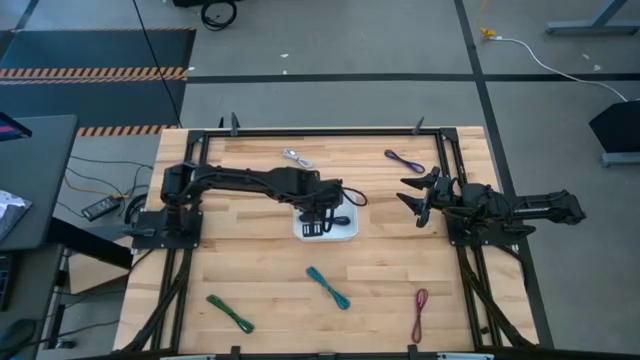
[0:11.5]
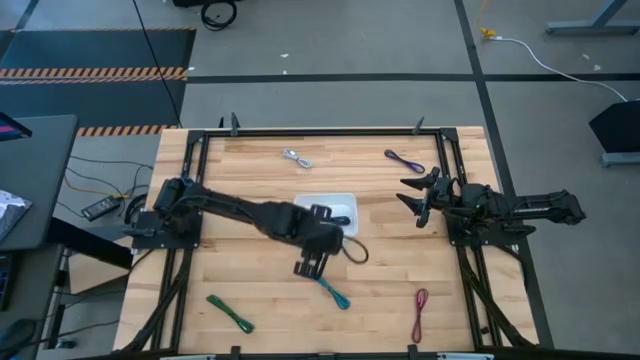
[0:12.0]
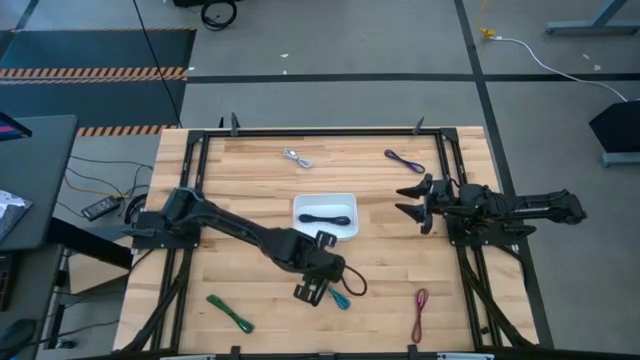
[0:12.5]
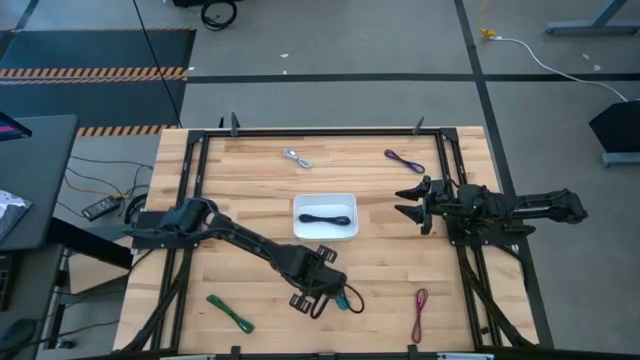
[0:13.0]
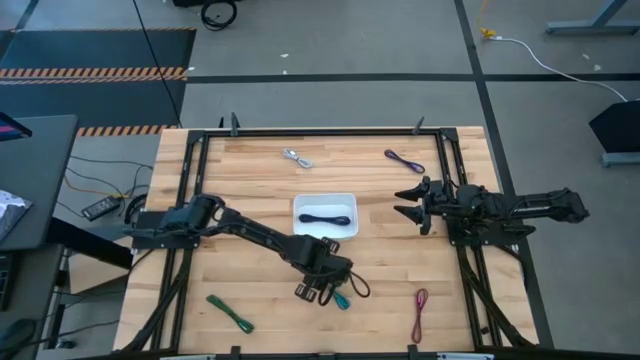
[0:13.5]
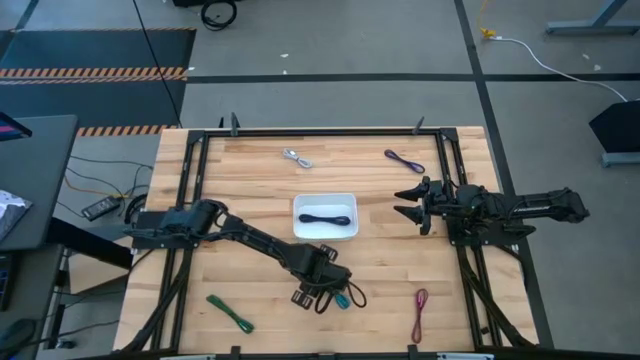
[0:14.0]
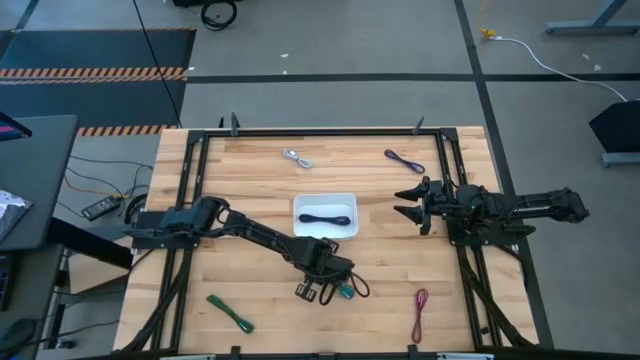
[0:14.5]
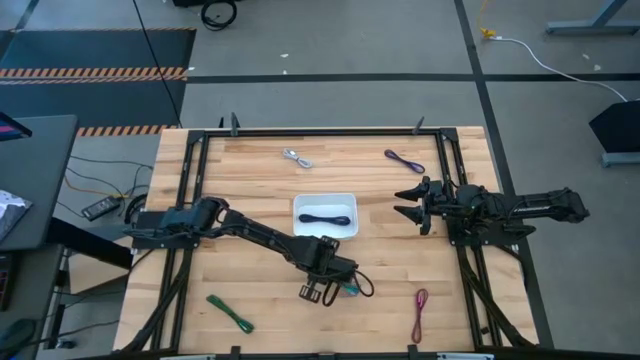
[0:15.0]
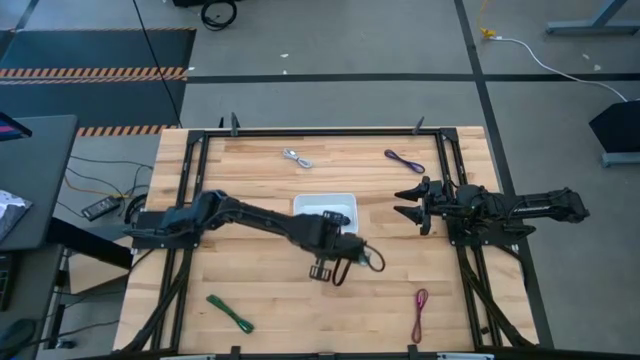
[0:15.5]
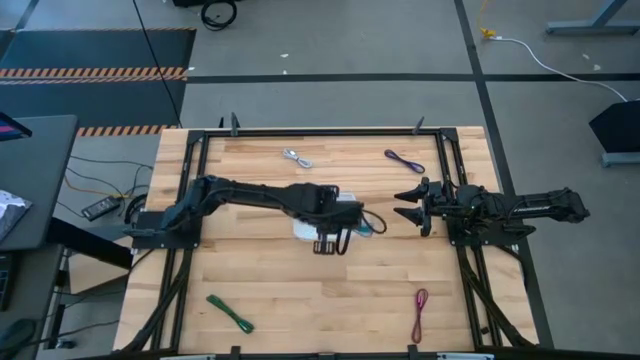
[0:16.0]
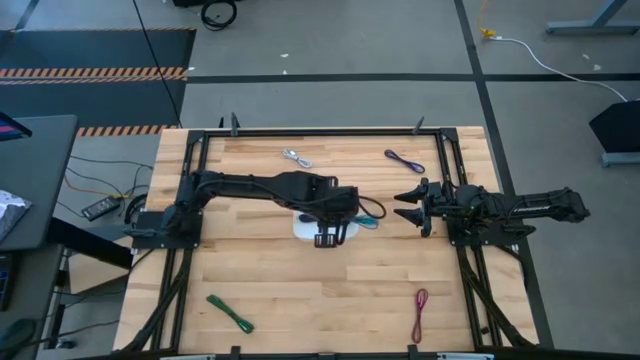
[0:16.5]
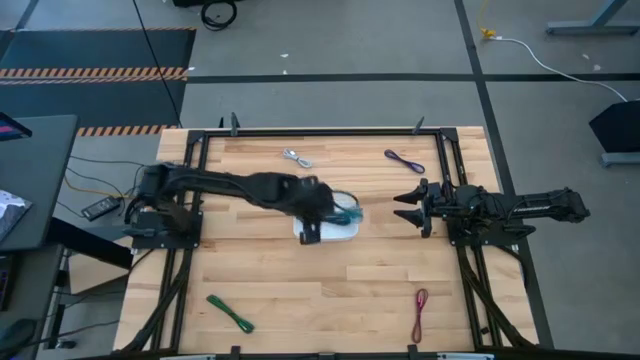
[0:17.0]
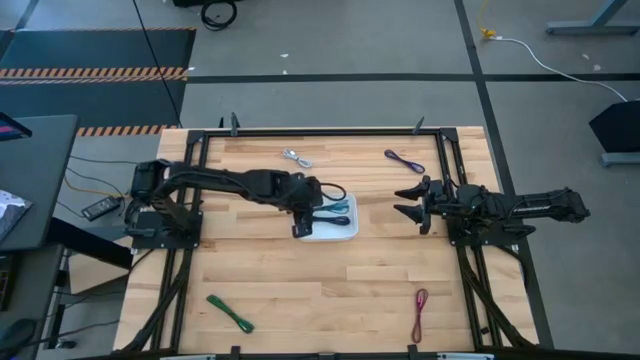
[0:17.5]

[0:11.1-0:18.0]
Task: Pick and place USB-C Cables
Put the light blue charger cable into the white bin

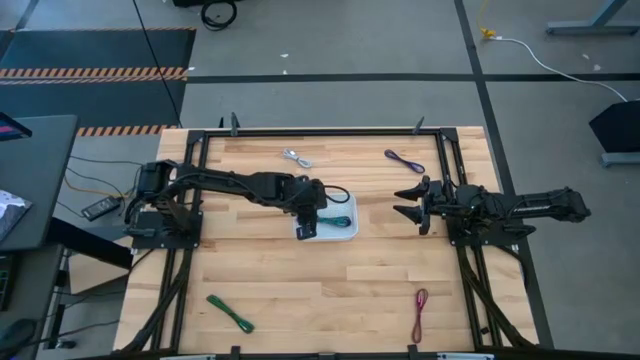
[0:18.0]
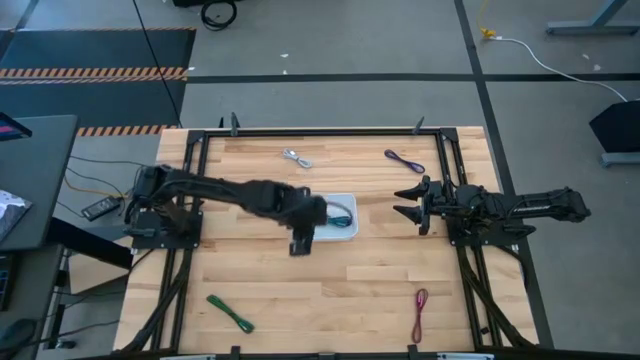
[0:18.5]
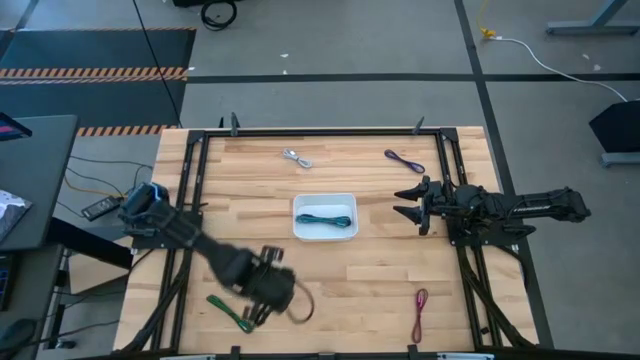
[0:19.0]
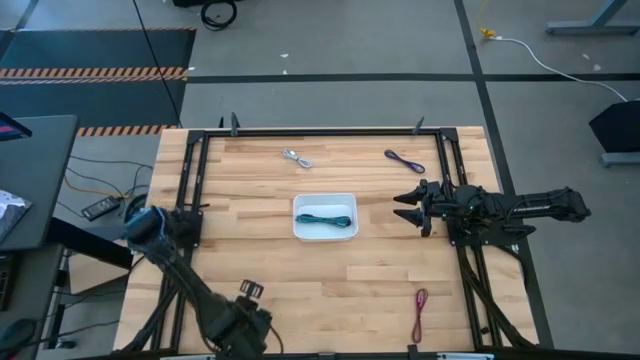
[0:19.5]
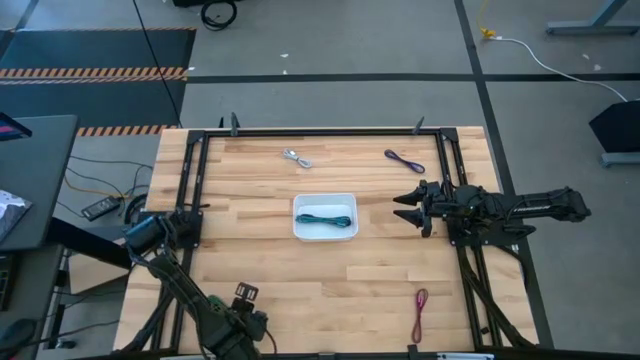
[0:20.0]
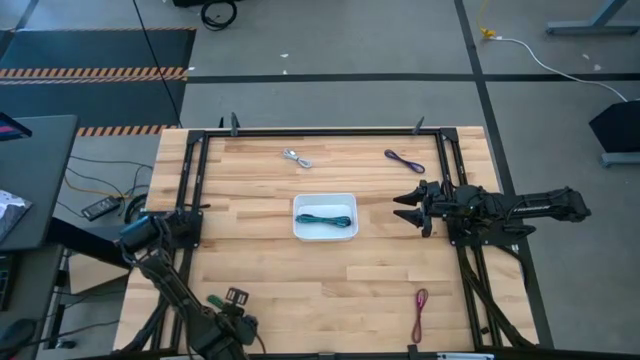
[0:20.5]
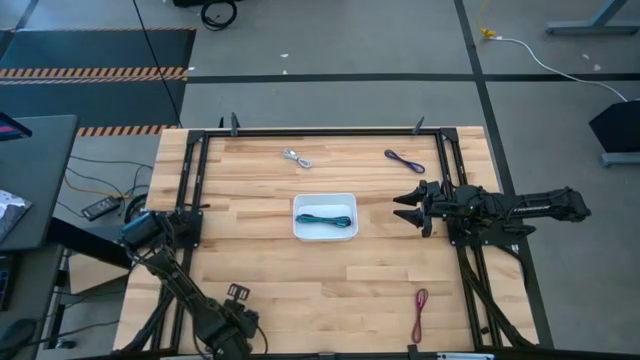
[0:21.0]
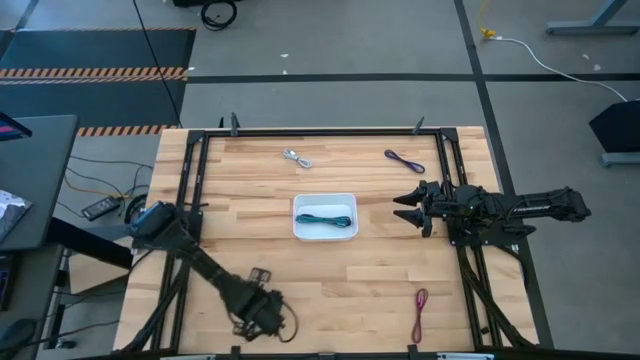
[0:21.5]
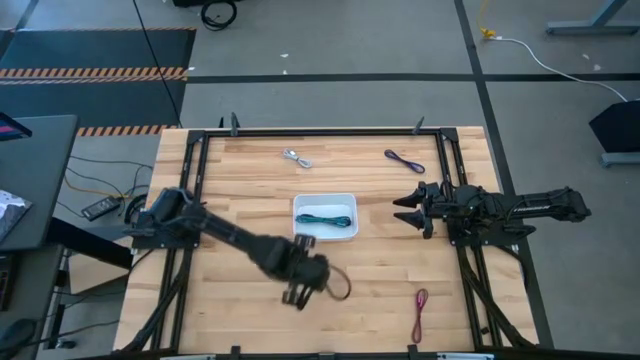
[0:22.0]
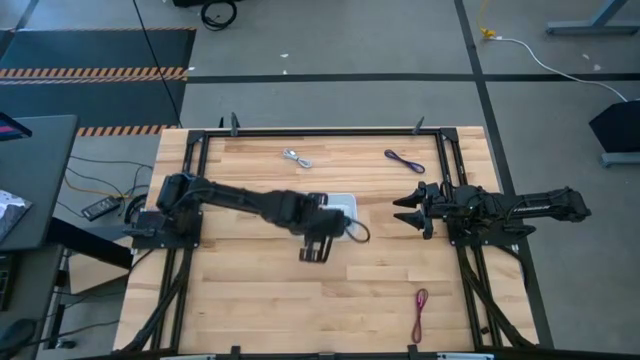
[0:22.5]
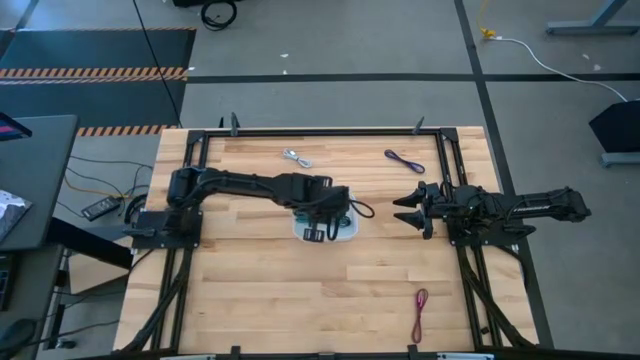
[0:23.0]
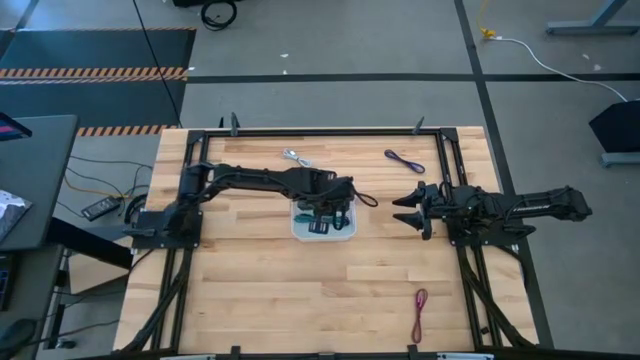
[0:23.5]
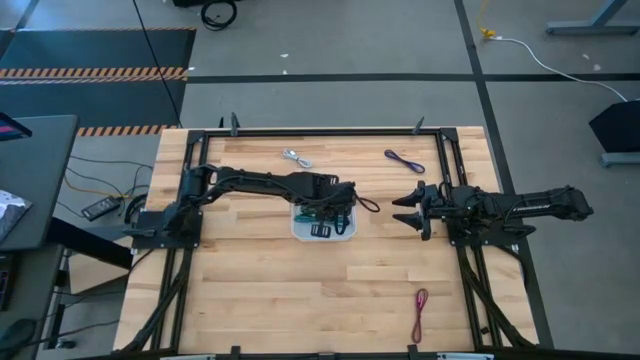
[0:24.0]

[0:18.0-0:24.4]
Put the green charger cable into the white bin

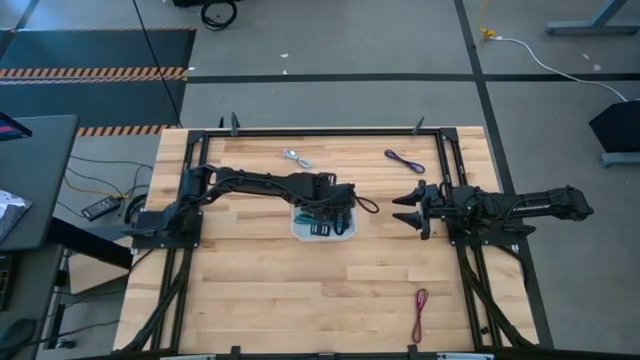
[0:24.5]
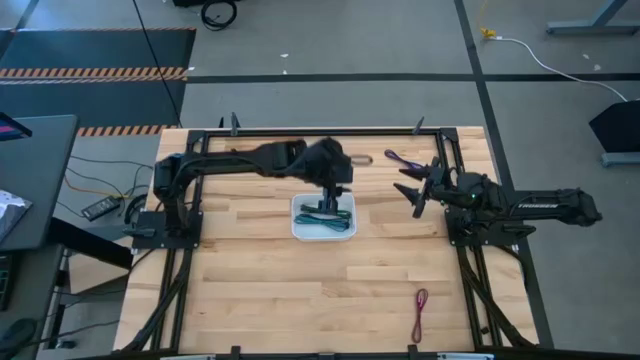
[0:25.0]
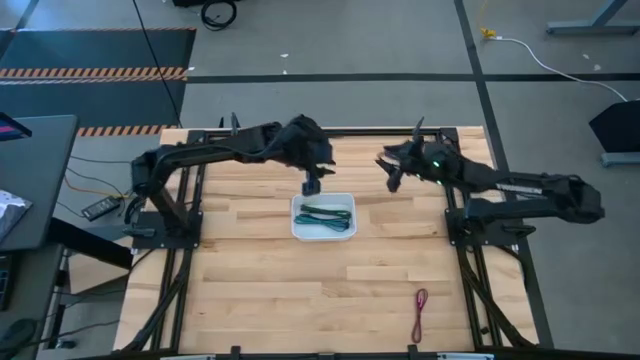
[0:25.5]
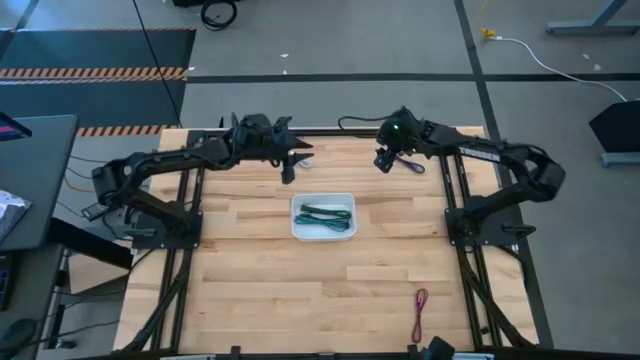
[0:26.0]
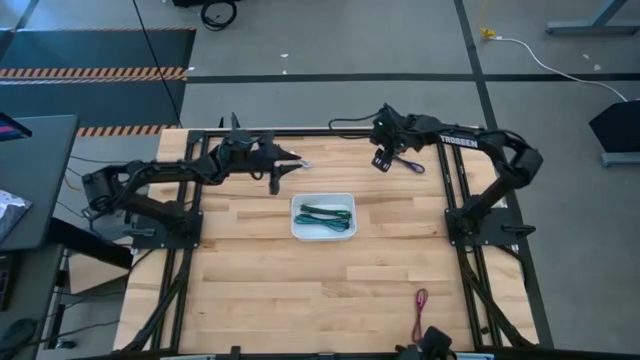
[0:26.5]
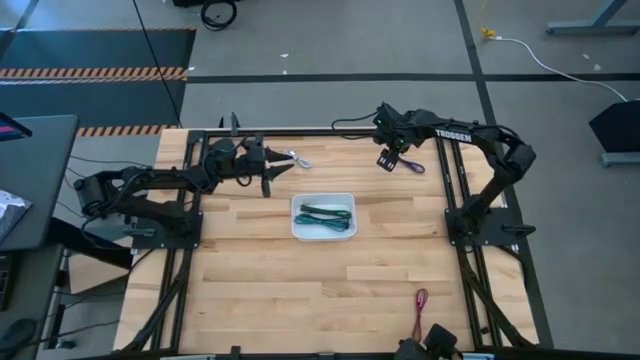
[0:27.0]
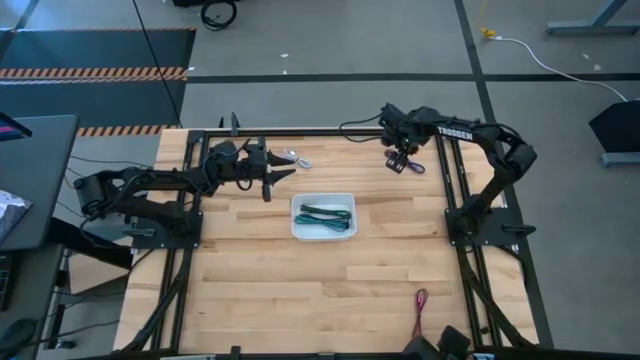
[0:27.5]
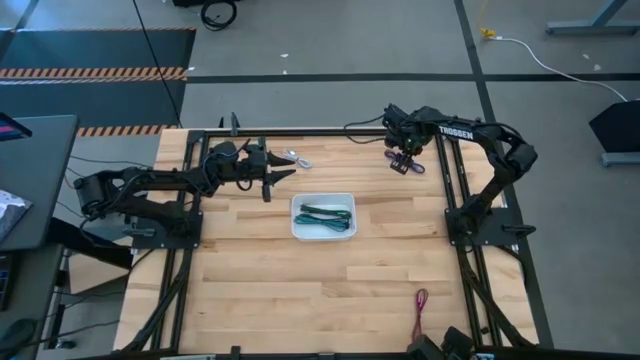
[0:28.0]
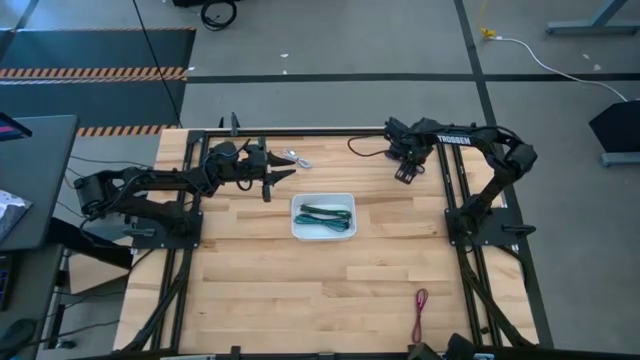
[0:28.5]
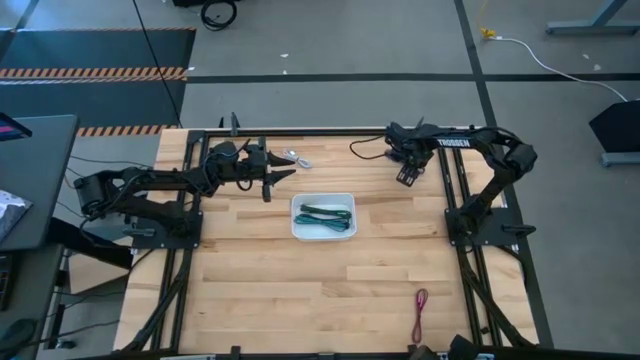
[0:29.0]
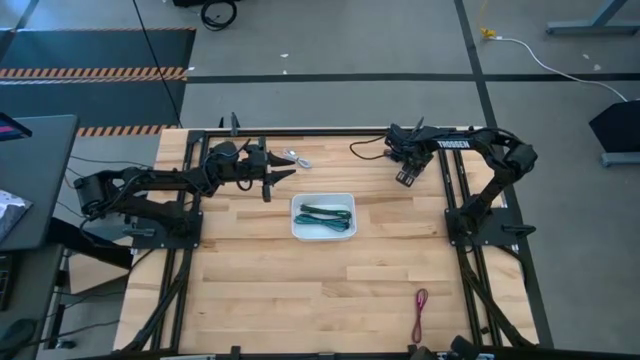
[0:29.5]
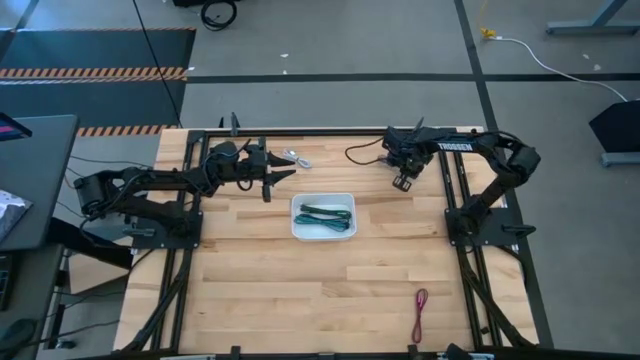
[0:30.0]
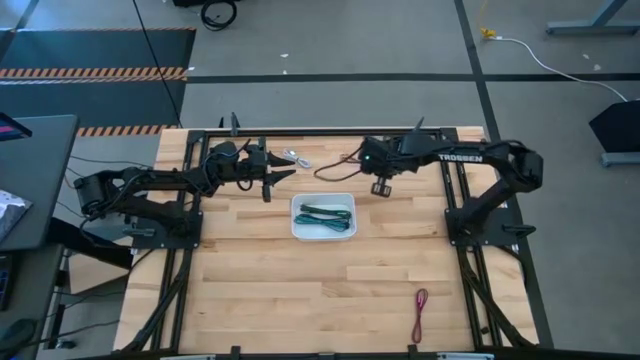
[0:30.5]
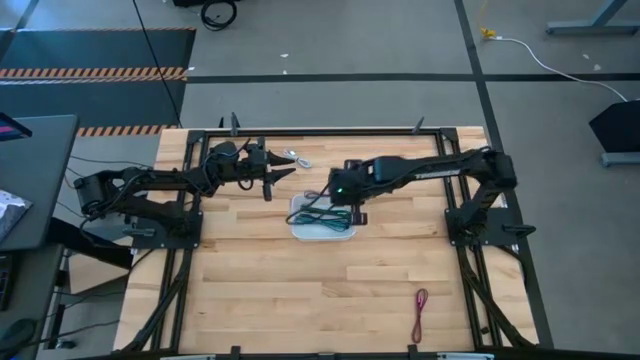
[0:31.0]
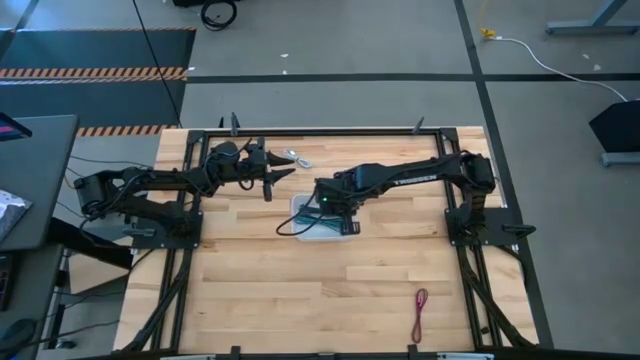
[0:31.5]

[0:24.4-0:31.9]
Put the purple charger cable into the white bin

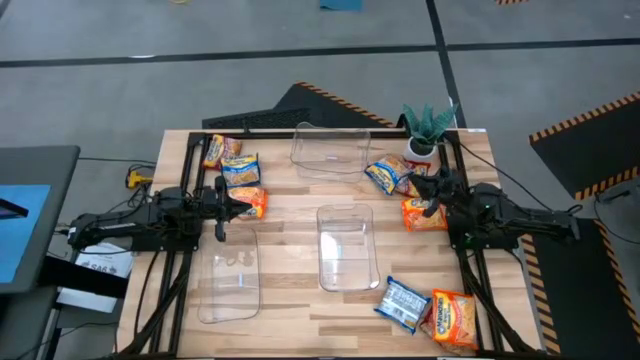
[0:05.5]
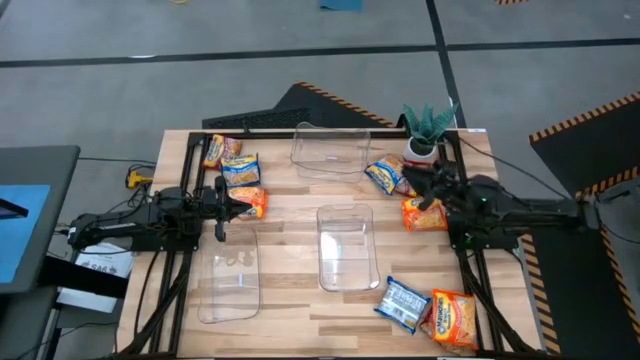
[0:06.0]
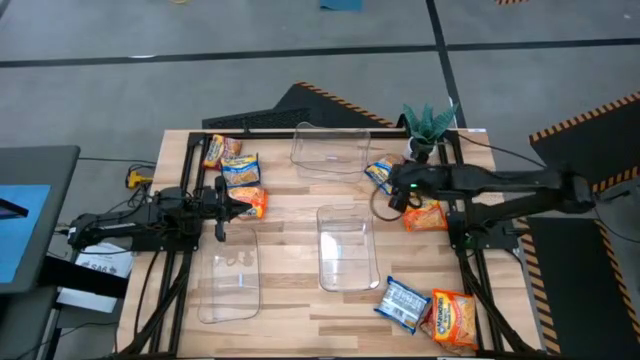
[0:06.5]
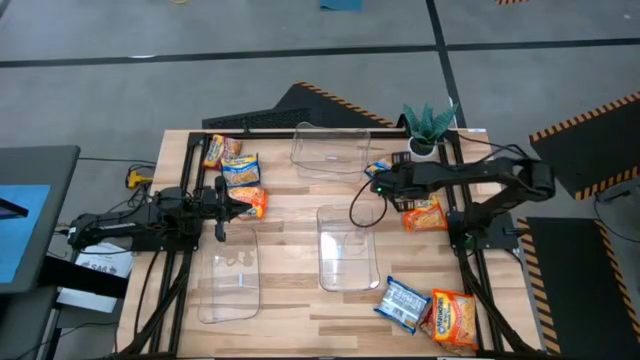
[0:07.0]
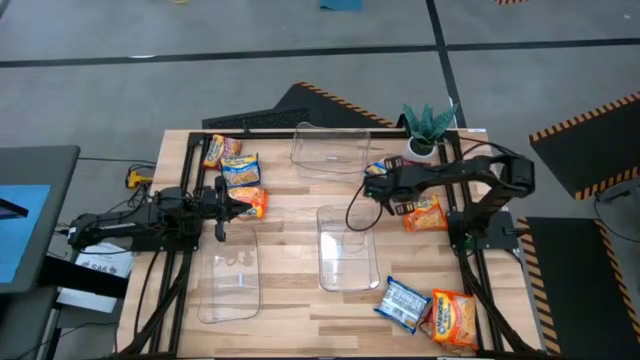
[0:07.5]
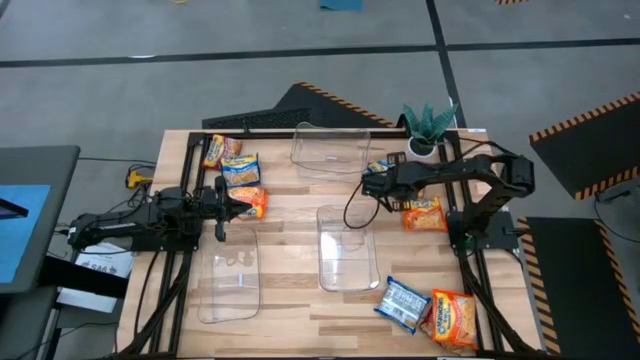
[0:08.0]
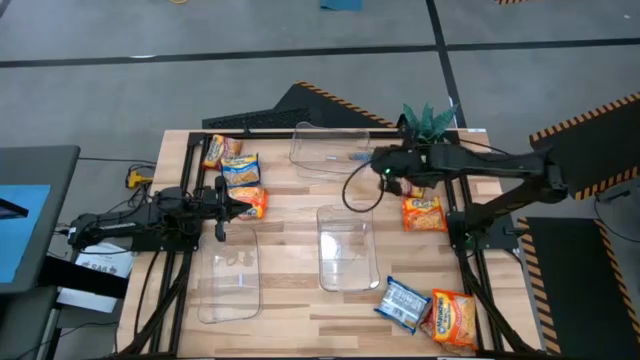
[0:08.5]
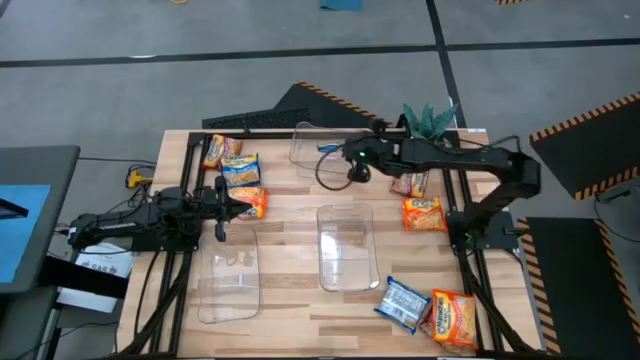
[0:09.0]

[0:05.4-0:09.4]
Task: Sort Maruchan noodles
Put the top right blue noodle pack into the top transparent bin
